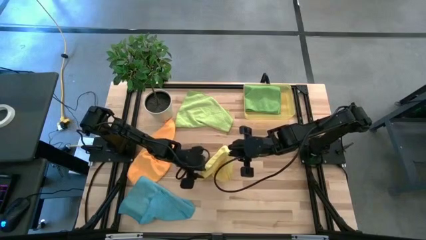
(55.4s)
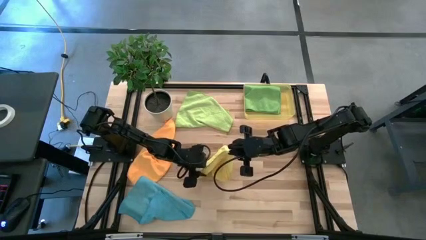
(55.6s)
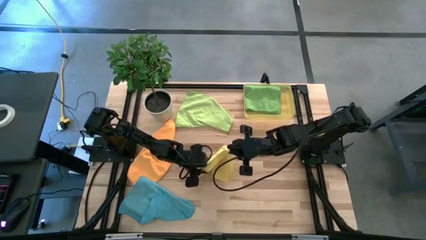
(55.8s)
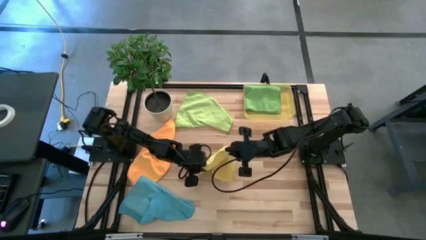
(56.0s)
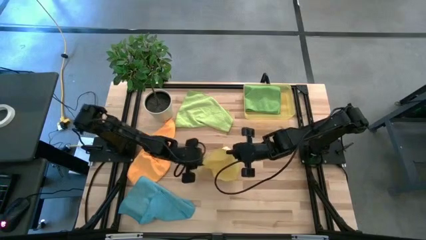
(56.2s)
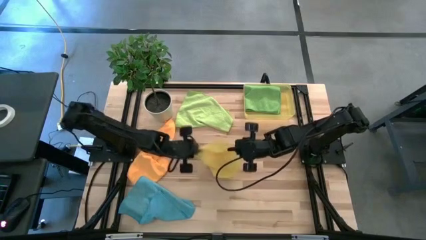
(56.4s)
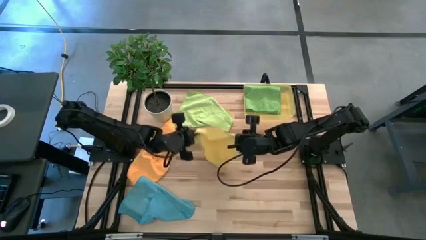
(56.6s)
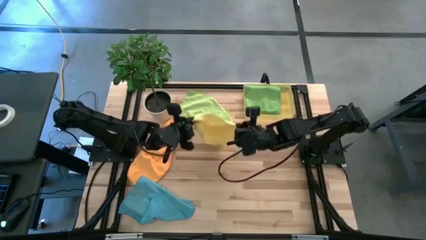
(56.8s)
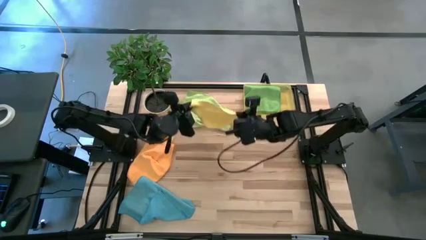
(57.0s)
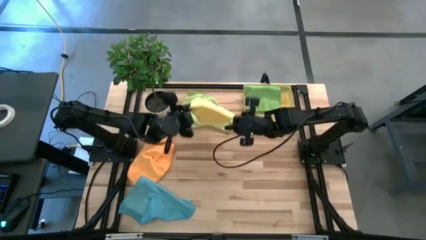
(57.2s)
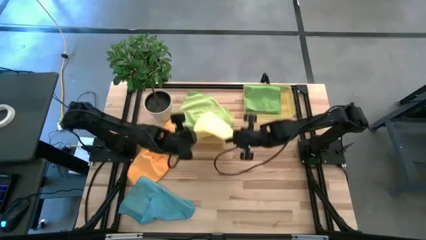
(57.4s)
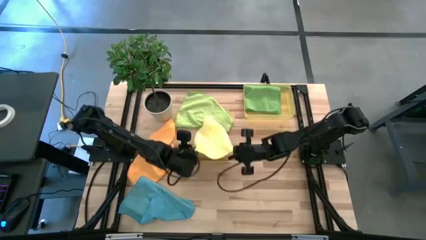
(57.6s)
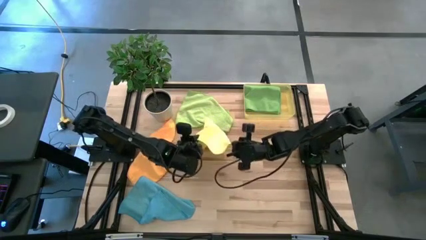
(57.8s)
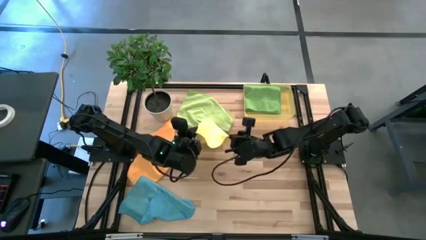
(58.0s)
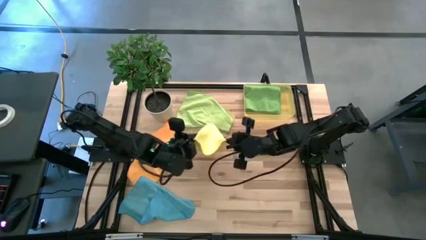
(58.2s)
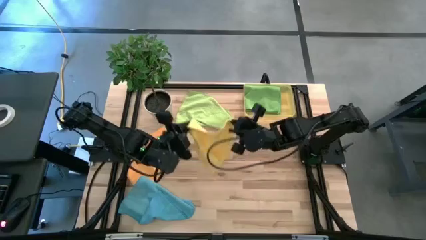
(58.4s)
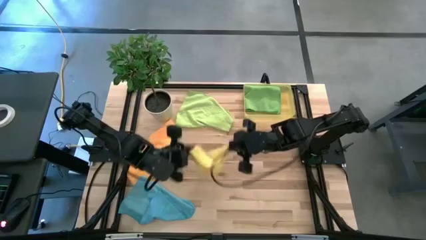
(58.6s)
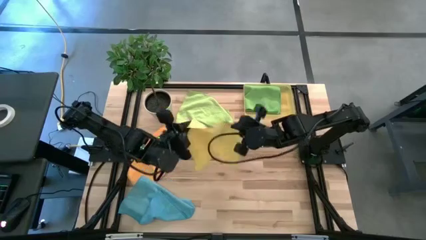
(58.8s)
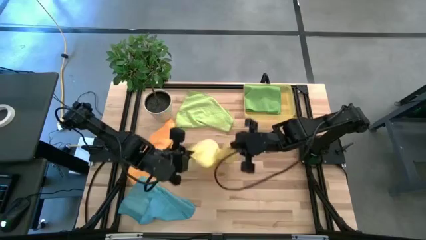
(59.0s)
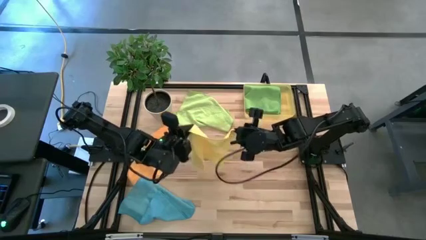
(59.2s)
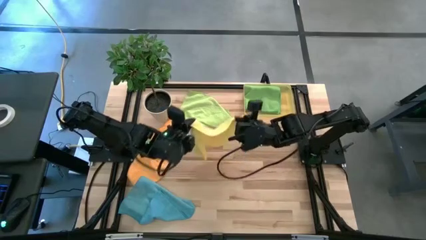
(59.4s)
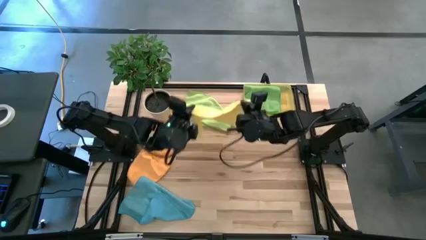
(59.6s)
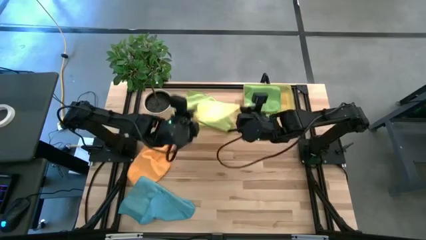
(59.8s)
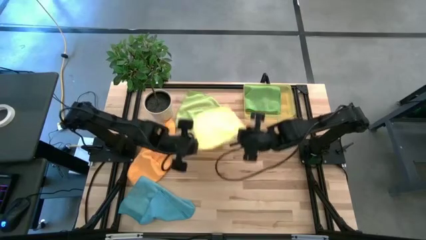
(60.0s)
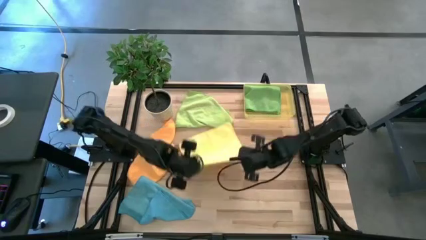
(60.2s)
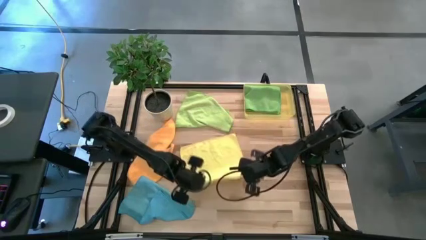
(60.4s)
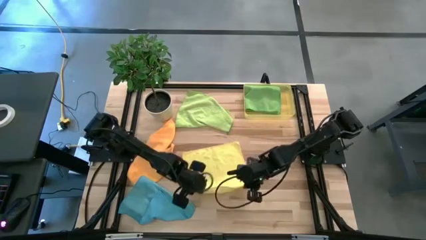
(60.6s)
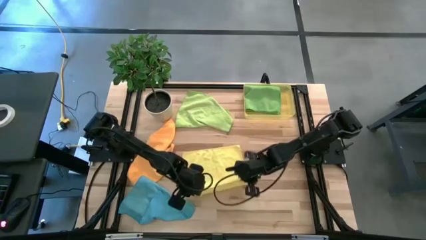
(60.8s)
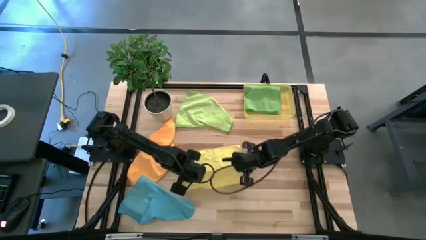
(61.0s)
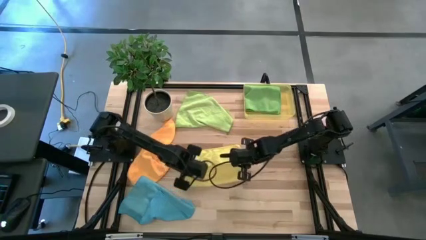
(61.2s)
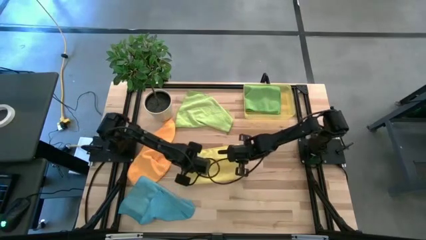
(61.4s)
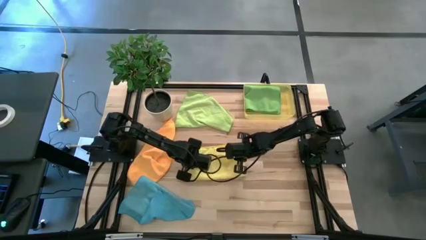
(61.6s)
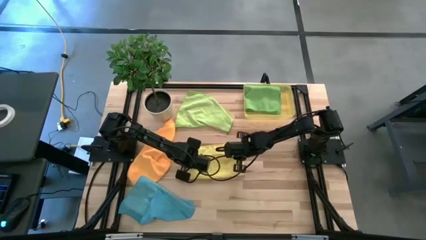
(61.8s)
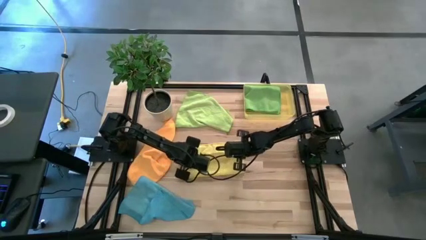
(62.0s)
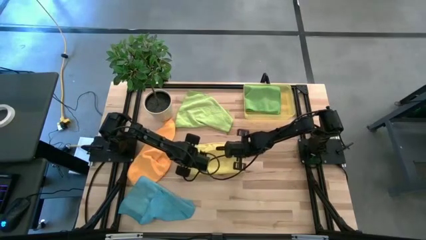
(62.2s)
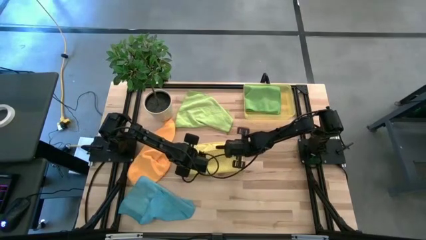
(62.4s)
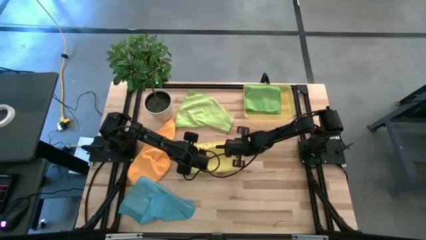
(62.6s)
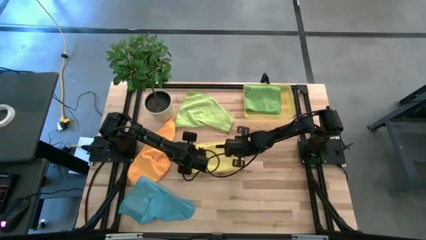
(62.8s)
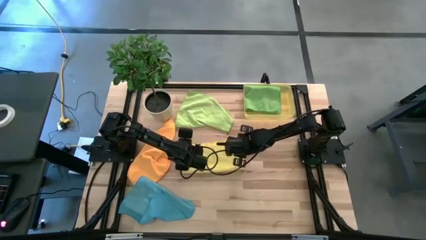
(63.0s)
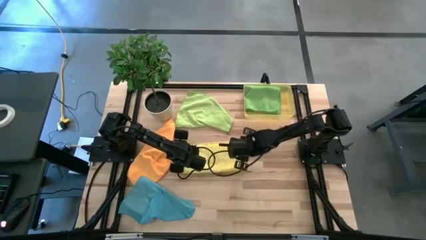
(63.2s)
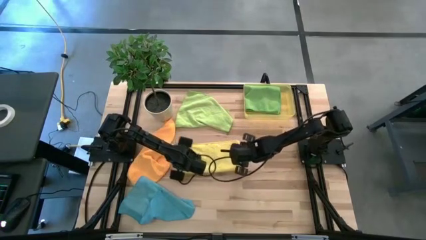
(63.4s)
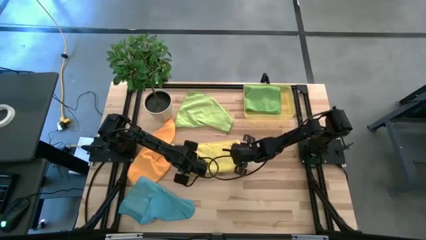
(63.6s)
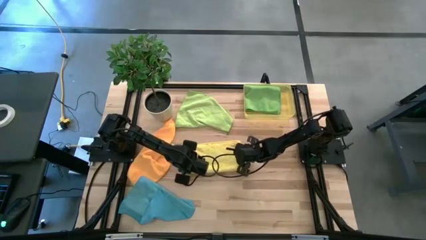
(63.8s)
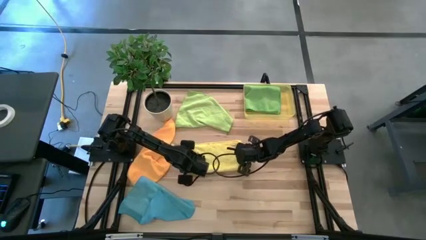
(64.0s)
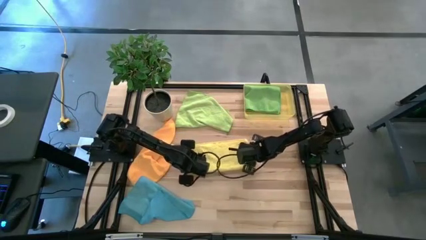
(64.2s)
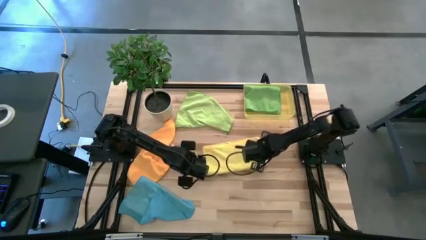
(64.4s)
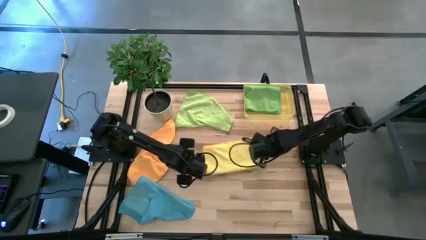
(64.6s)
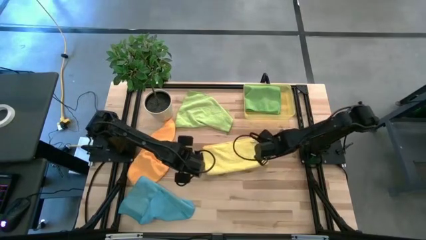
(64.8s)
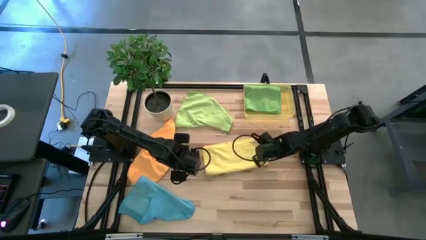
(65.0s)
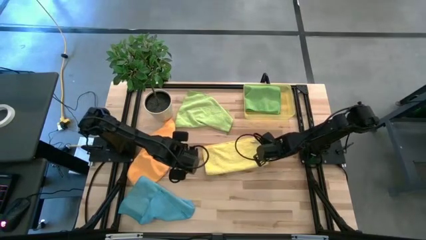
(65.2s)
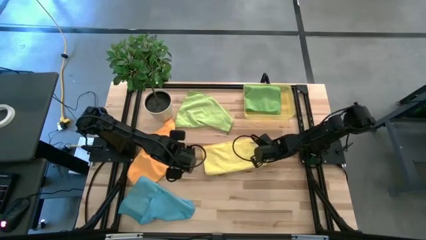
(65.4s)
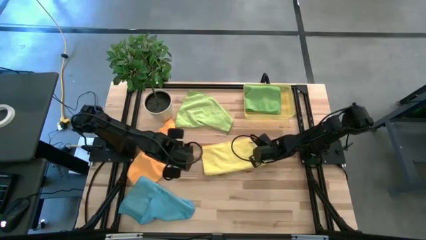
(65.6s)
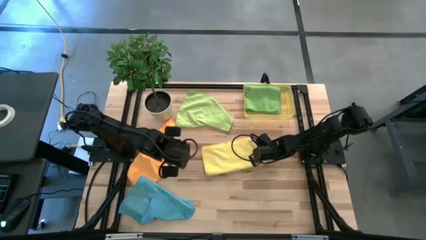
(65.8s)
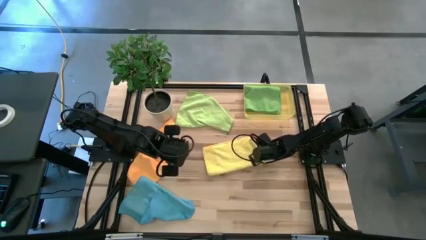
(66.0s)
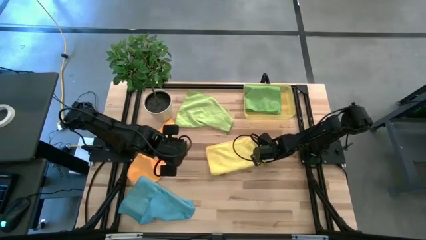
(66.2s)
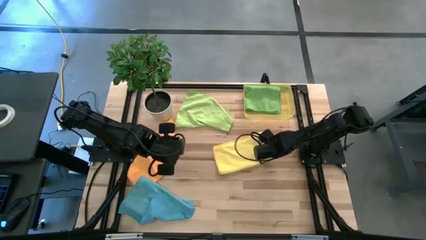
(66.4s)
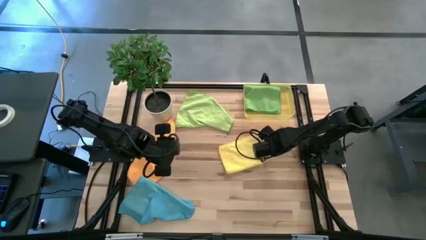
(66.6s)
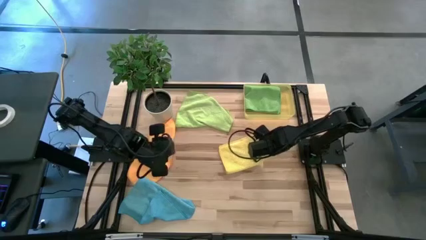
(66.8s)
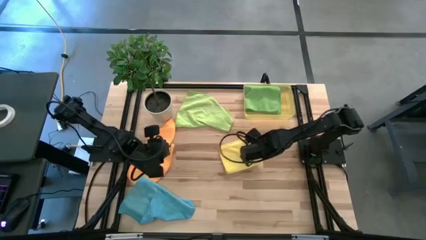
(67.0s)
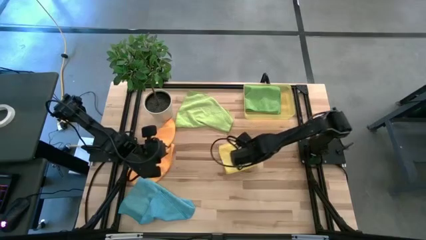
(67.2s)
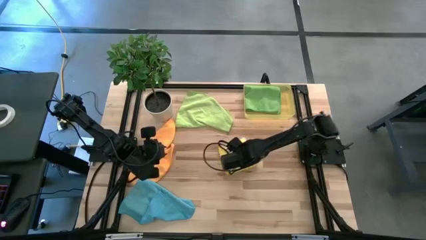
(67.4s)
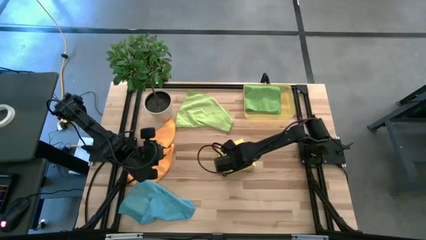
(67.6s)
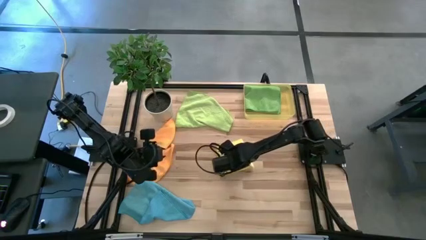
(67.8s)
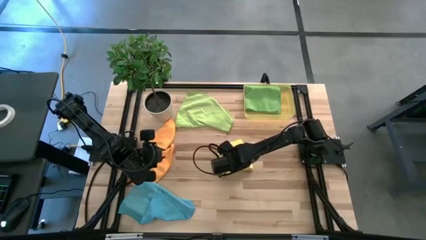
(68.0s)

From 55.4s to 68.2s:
Task: Fold microfiber towels
Fold the yellow microfiber towel

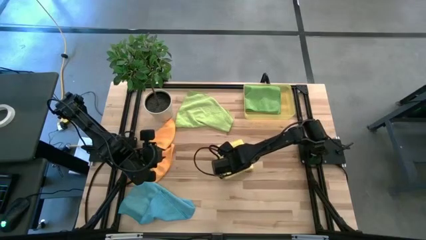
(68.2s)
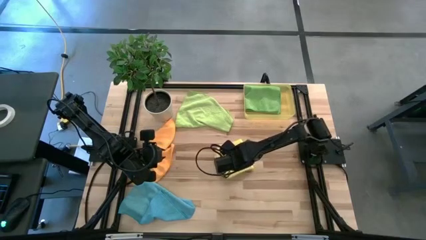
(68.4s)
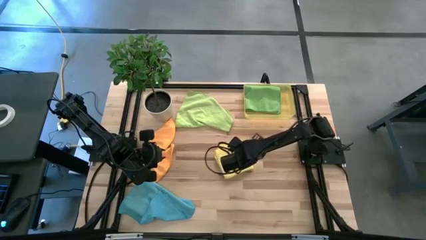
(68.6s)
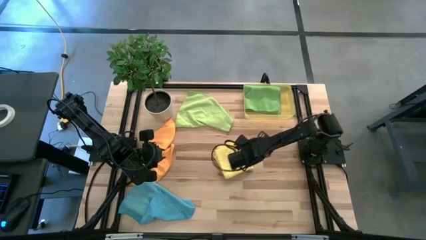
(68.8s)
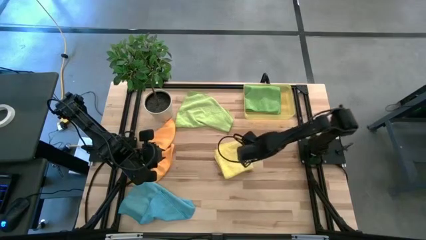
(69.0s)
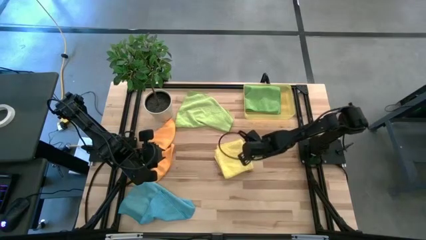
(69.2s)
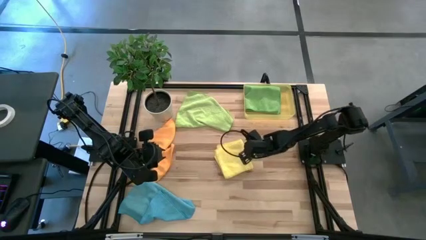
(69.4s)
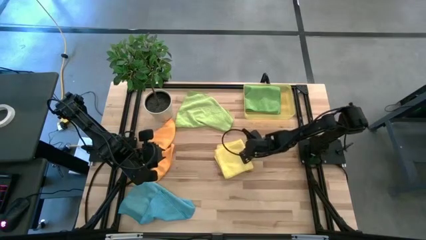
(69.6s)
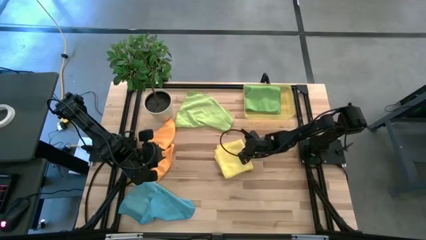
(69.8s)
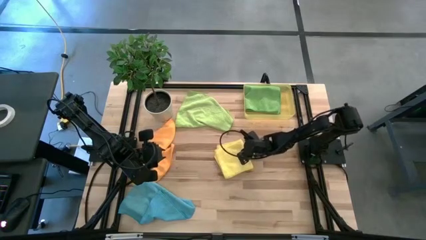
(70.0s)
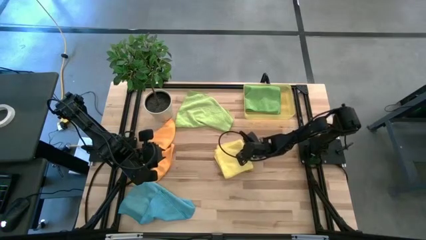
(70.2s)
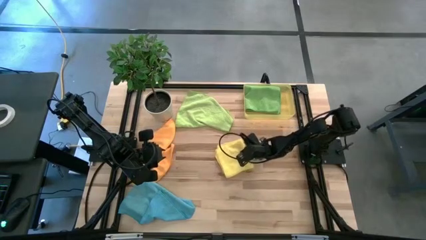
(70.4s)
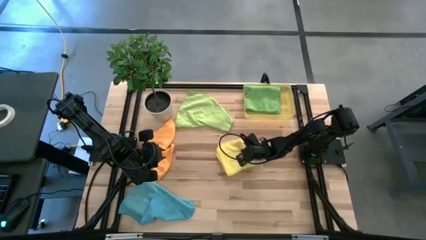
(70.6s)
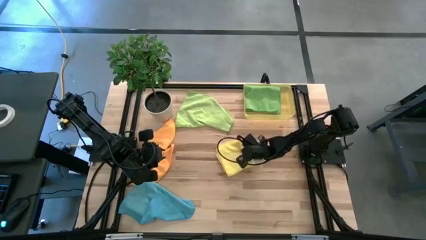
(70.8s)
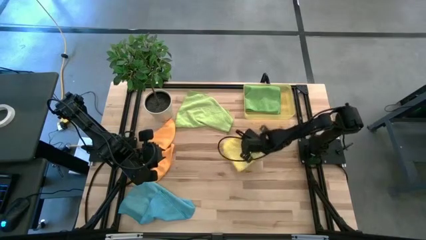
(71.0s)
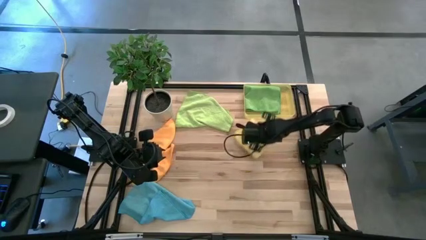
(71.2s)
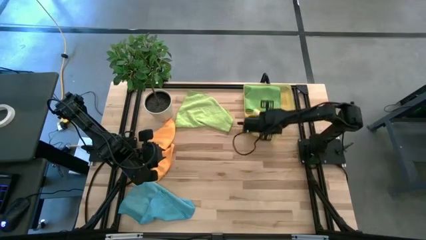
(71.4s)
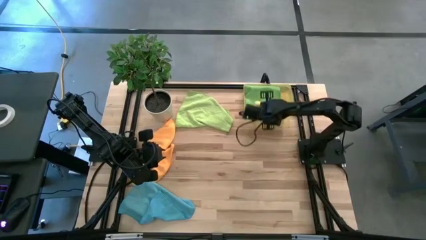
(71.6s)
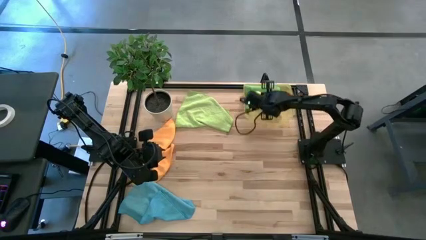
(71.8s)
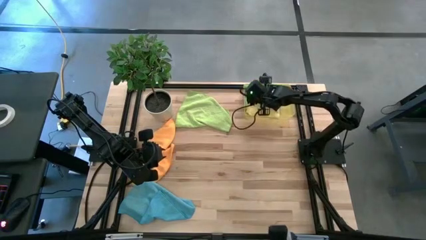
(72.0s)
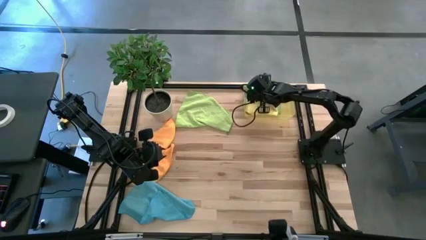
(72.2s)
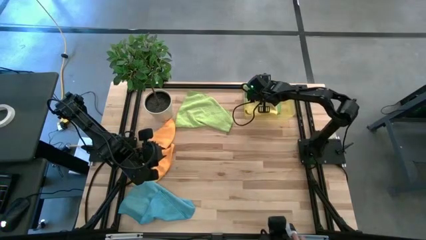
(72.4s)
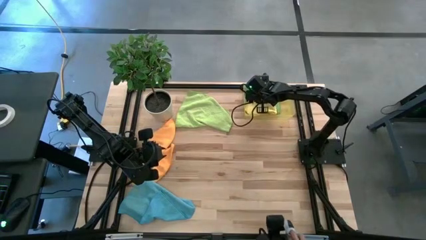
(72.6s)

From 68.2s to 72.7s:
Put the yellow microfiber towel into the yellow bin
